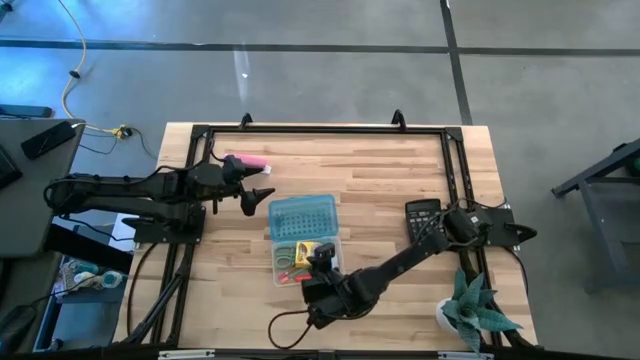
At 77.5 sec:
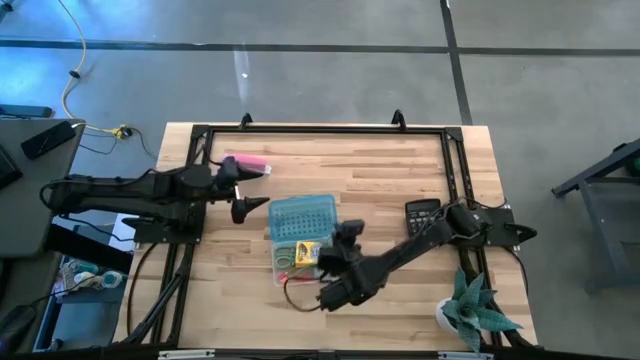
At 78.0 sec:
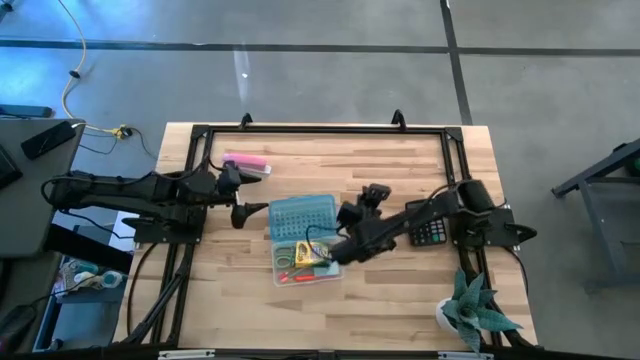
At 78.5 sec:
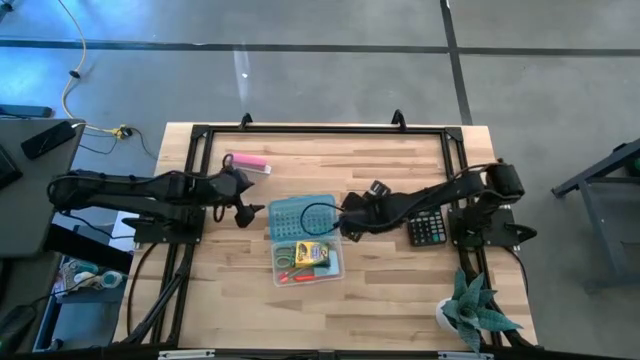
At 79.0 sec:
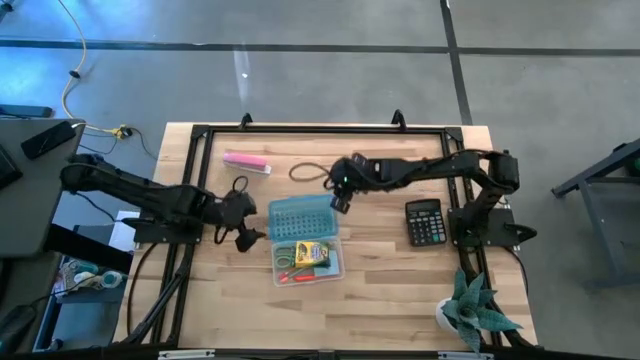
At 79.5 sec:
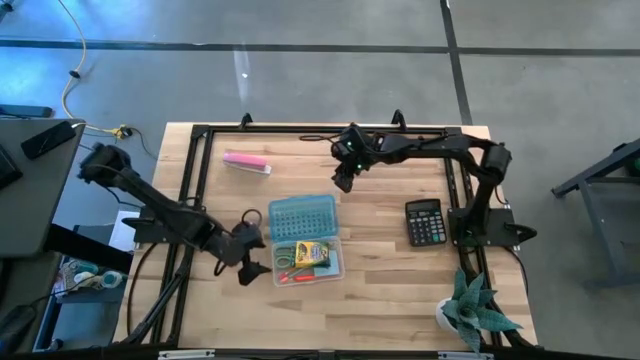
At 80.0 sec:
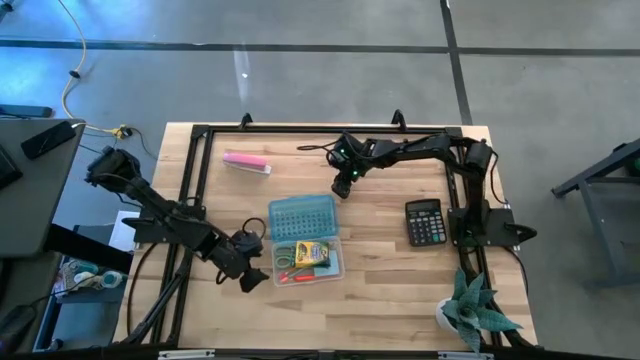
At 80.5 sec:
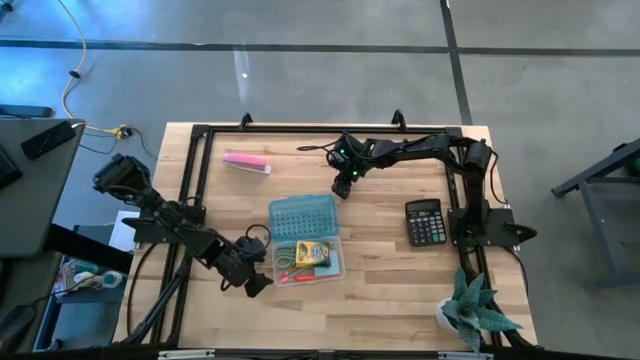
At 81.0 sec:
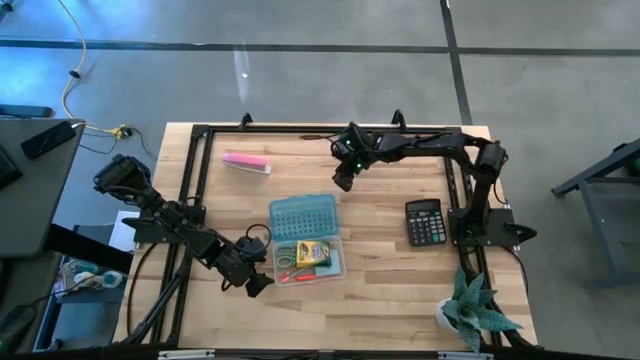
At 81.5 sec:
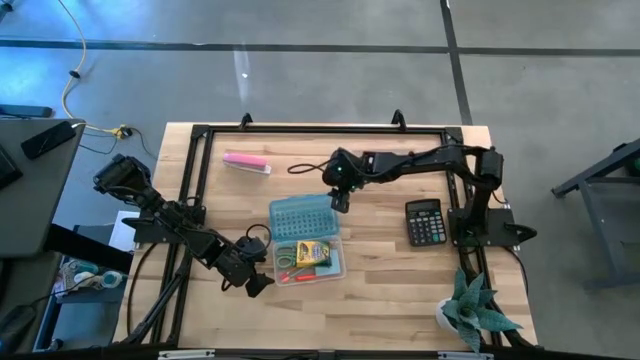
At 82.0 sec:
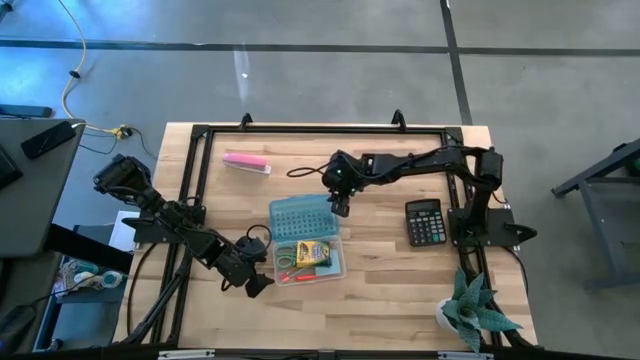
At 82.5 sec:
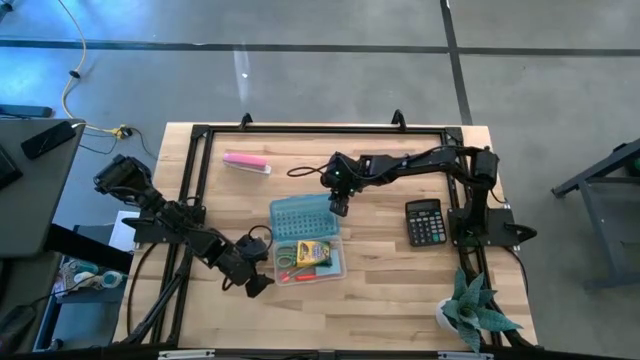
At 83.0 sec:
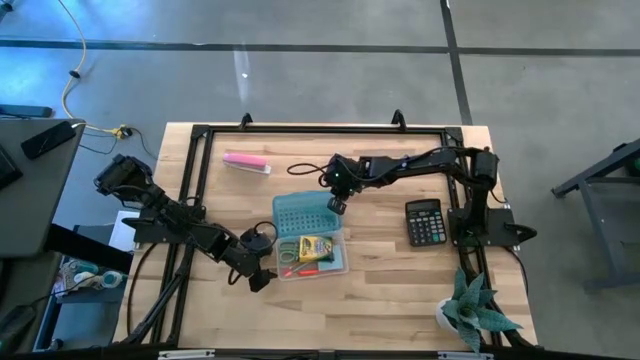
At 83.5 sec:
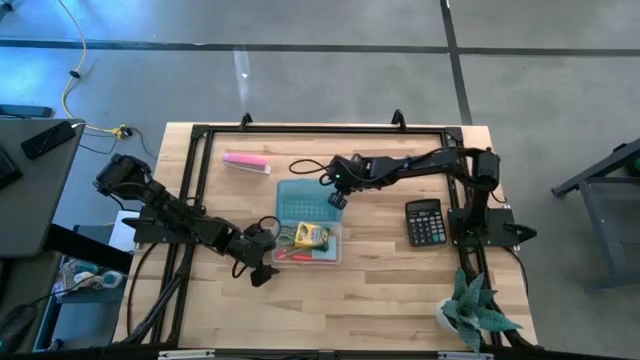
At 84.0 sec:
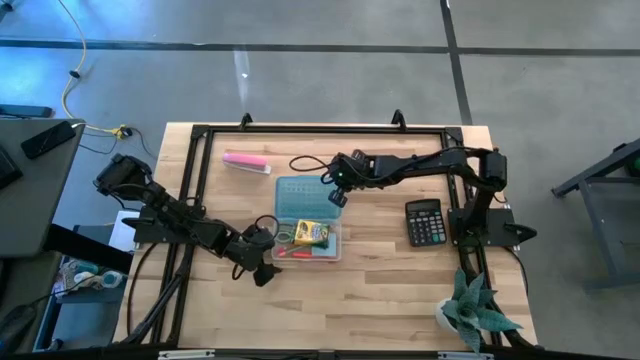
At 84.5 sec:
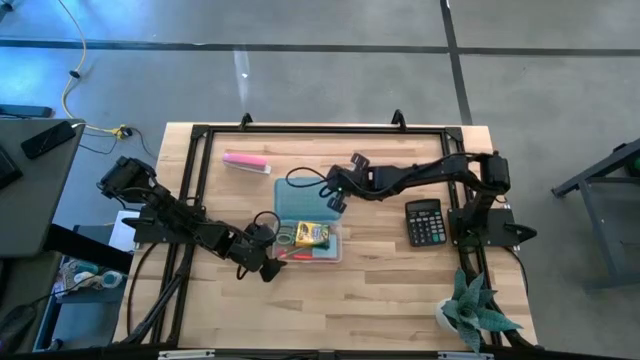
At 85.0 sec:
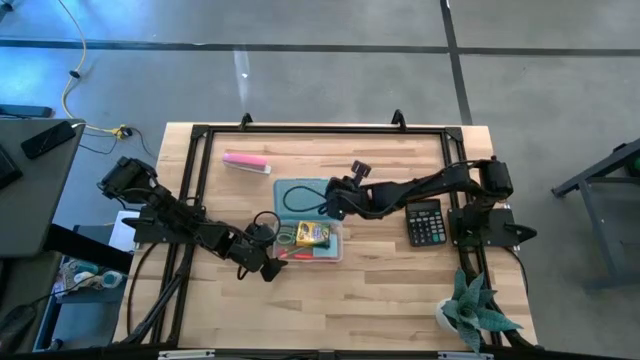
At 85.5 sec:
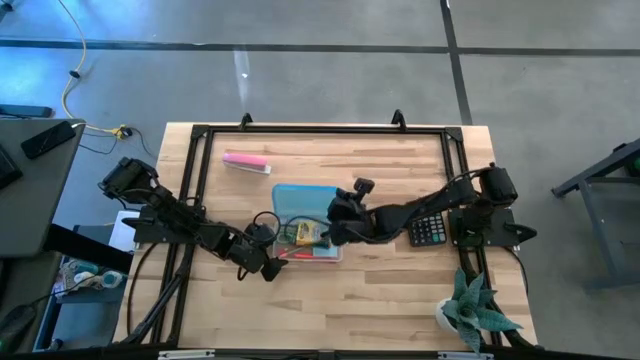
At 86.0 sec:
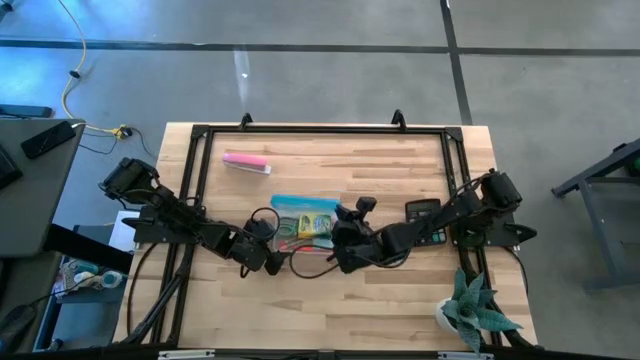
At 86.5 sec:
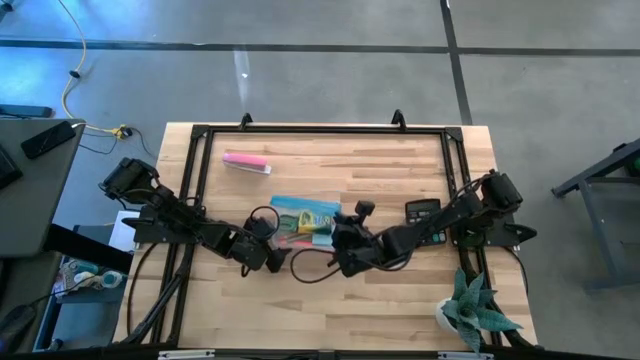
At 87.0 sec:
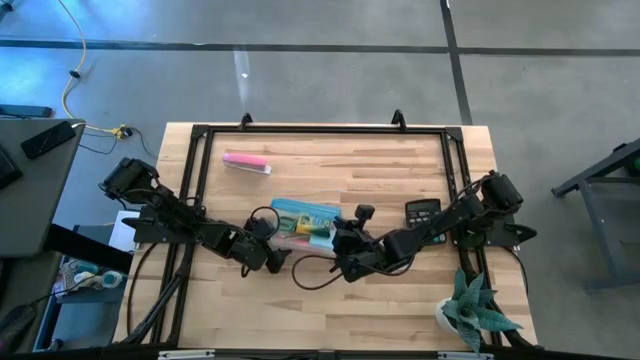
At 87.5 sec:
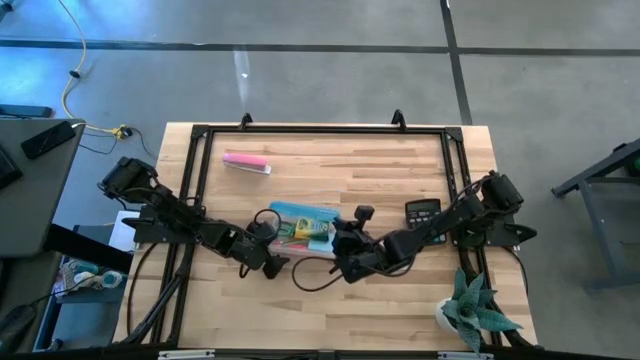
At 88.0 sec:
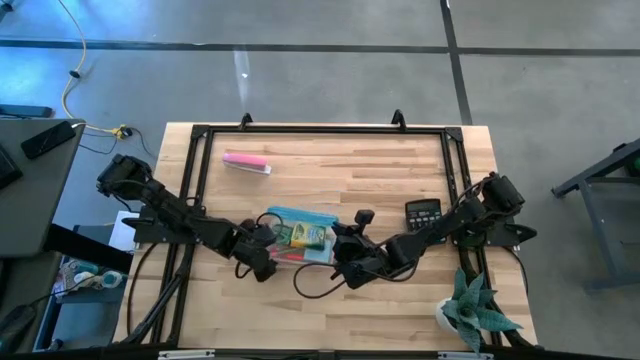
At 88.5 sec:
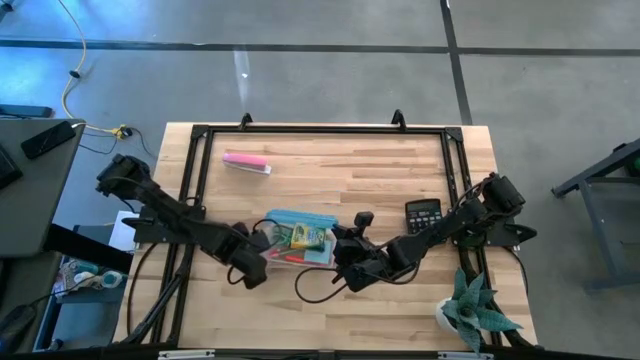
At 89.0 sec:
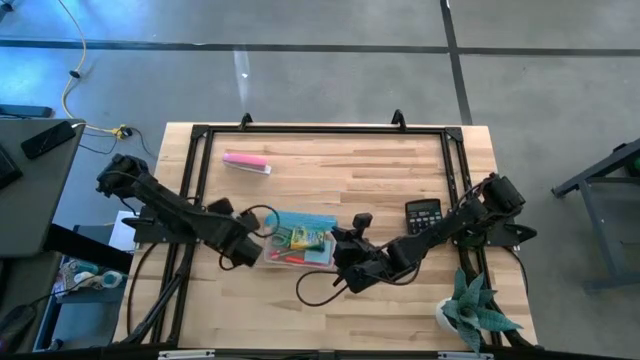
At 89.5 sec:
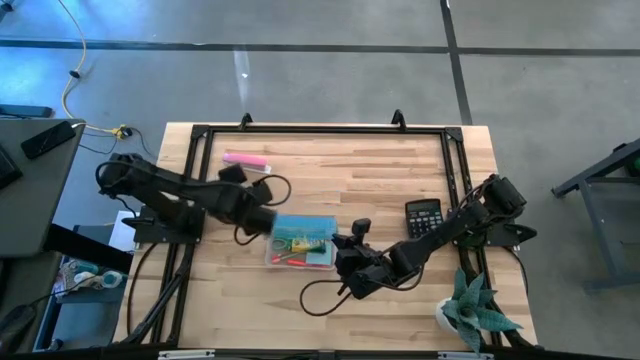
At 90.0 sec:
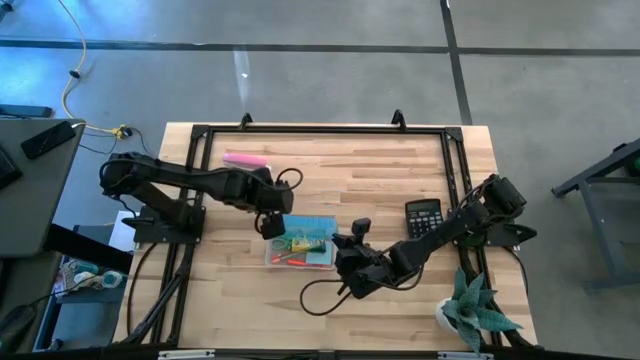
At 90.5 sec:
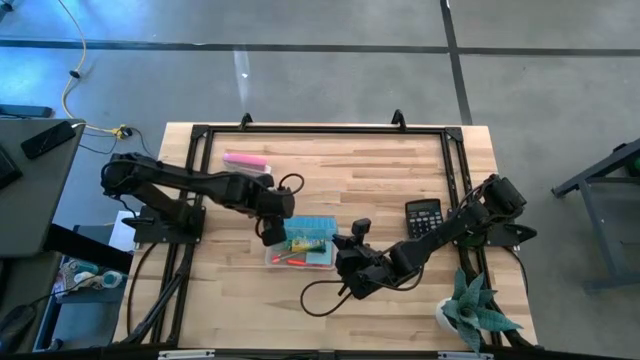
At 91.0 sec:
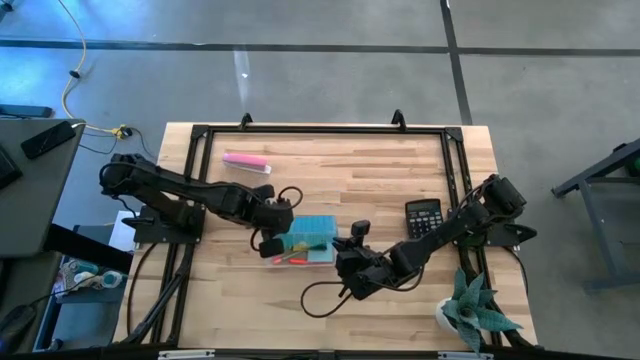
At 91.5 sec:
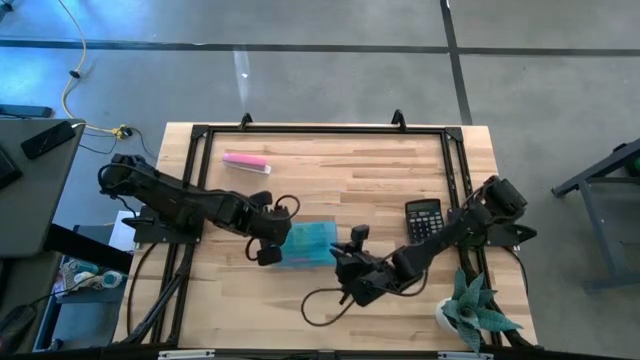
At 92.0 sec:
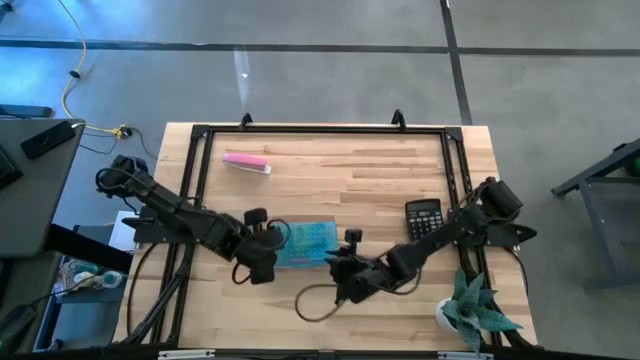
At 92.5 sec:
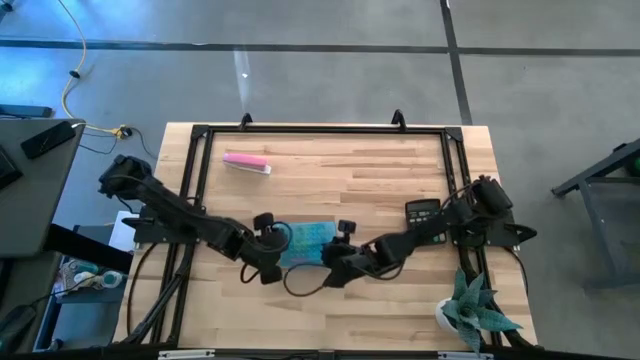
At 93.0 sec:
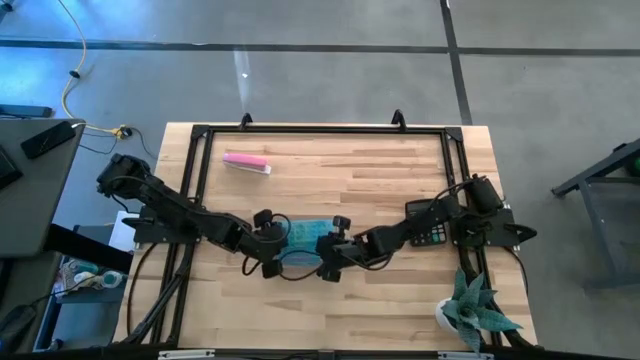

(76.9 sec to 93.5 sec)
Task: Pack school essentials
Close the supply box

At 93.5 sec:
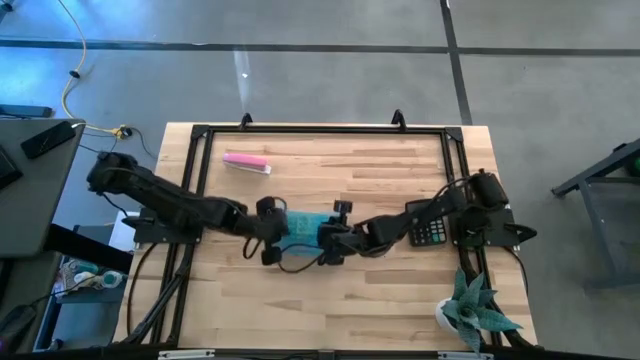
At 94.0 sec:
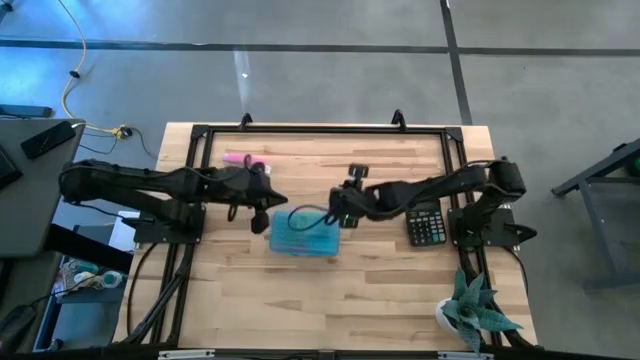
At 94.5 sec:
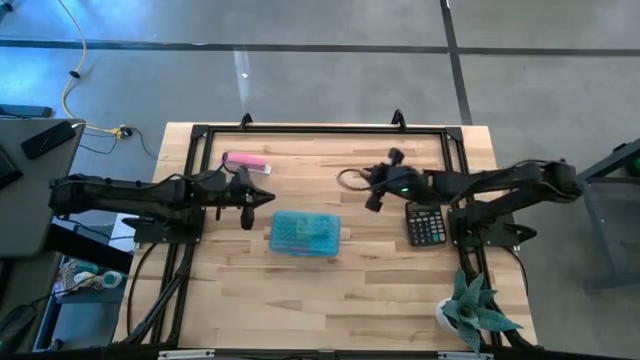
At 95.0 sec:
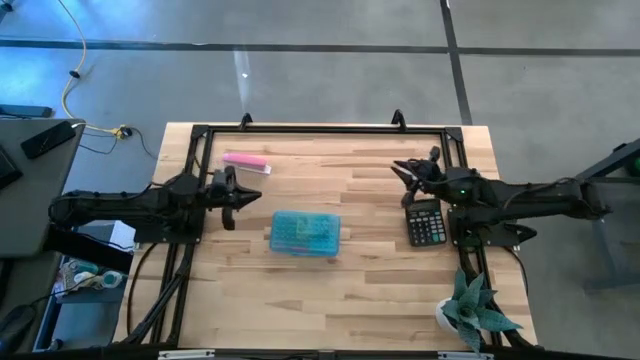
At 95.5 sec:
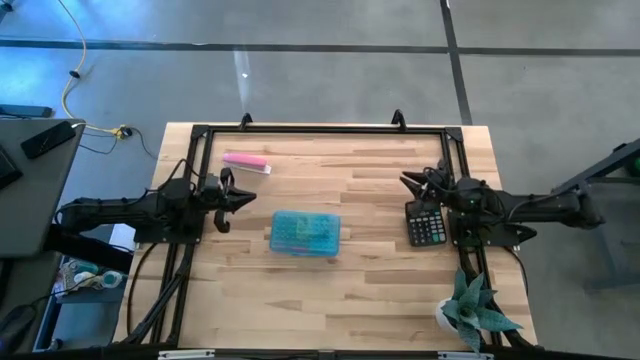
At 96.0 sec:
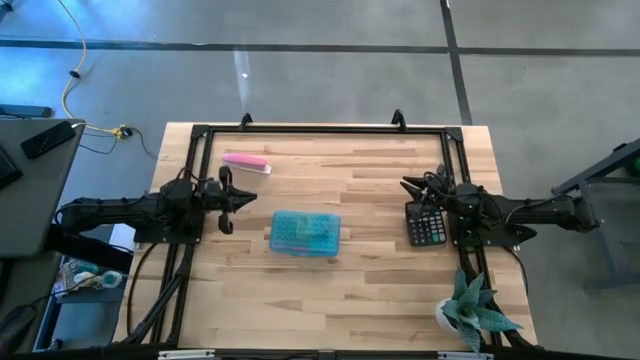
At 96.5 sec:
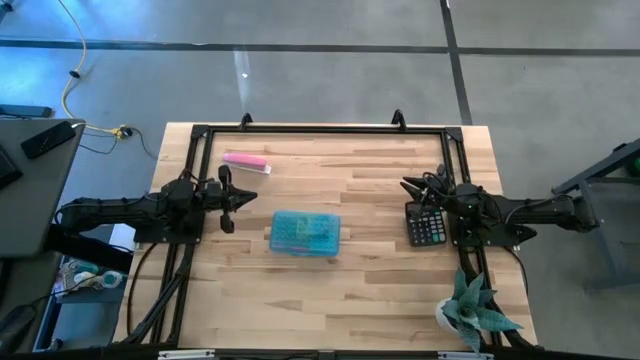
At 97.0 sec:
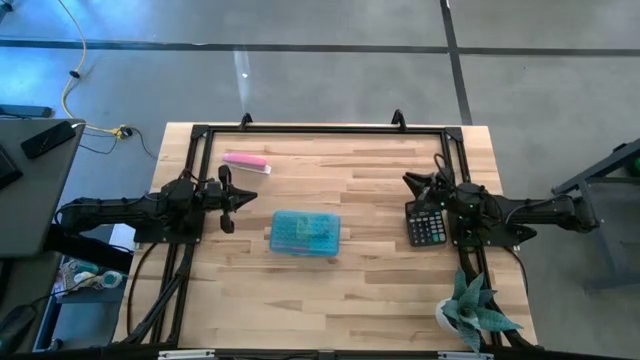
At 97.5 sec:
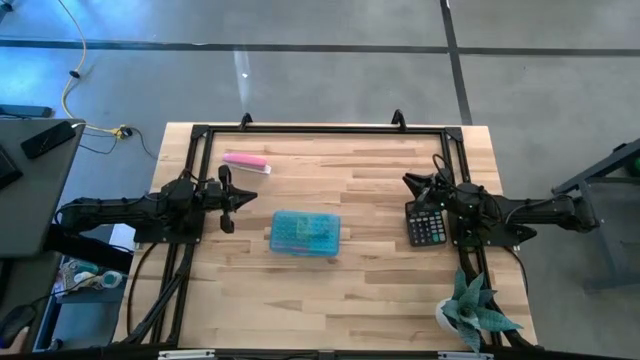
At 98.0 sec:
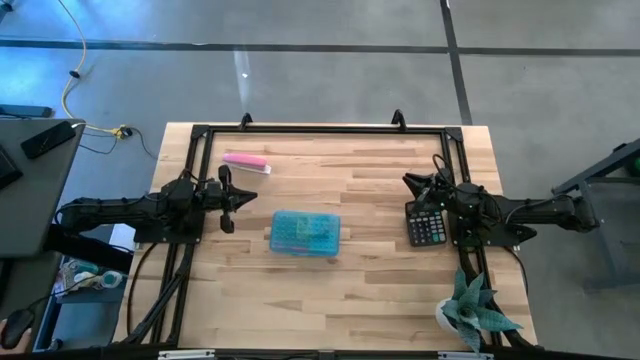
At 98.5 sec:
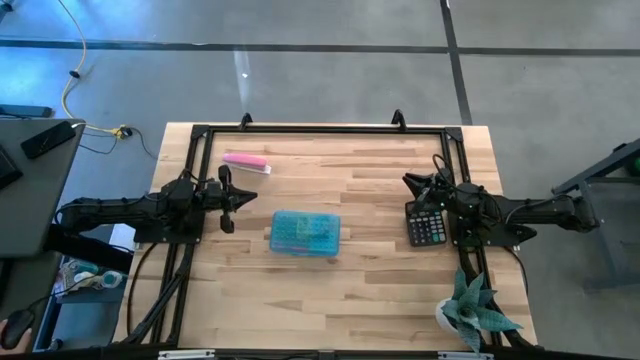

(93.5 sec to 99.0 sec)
Return to Home Position
